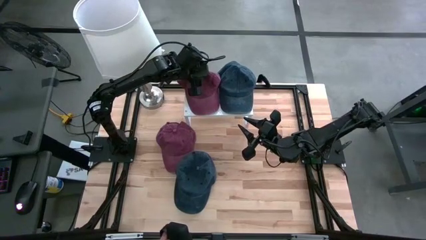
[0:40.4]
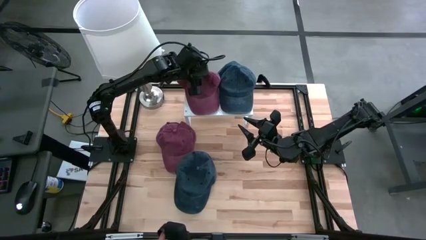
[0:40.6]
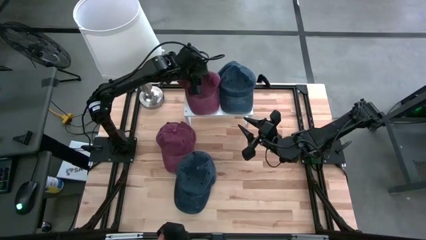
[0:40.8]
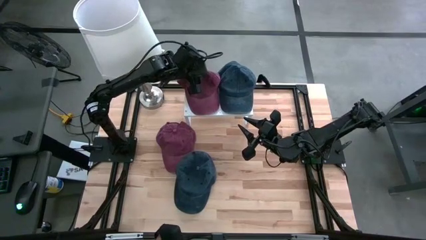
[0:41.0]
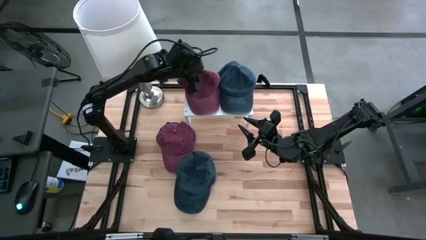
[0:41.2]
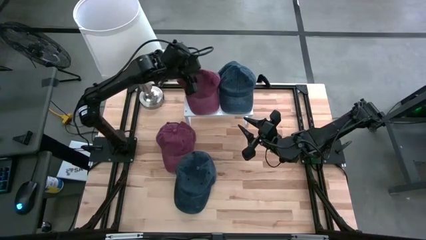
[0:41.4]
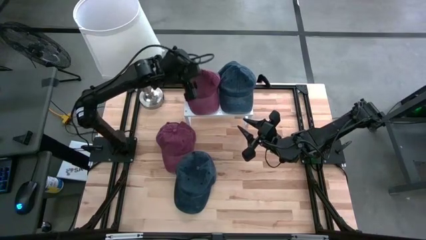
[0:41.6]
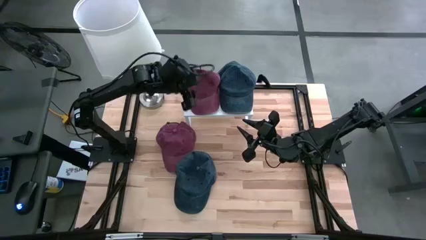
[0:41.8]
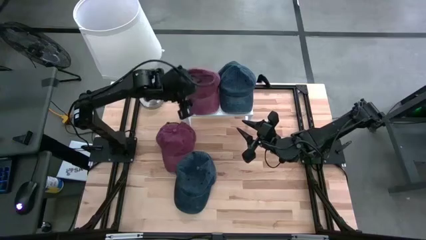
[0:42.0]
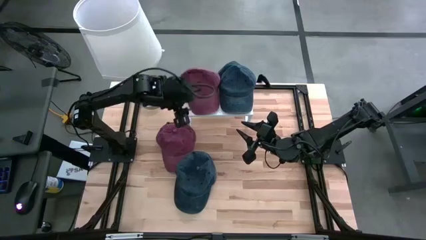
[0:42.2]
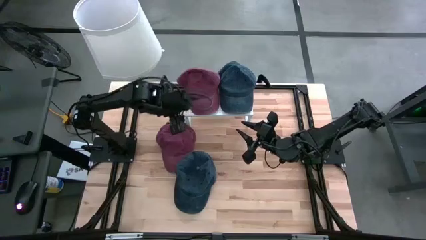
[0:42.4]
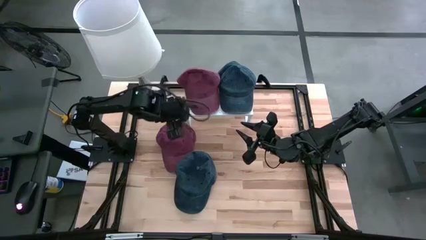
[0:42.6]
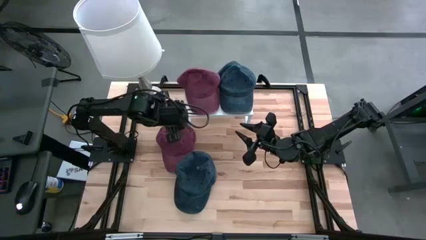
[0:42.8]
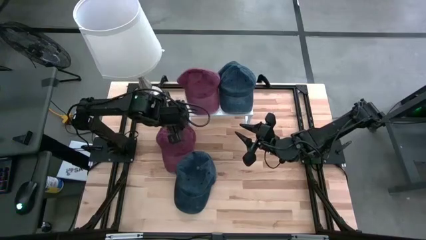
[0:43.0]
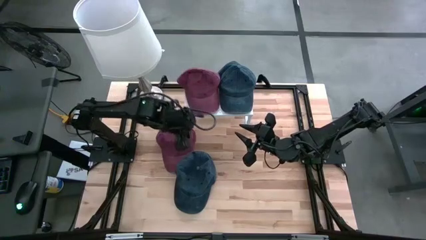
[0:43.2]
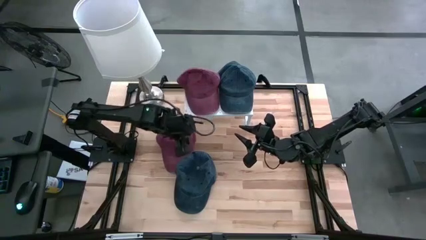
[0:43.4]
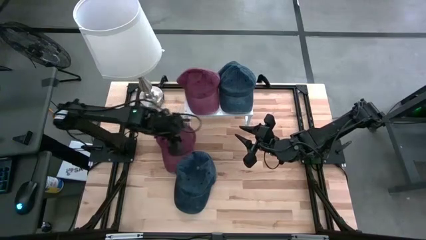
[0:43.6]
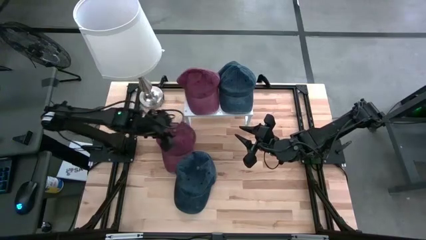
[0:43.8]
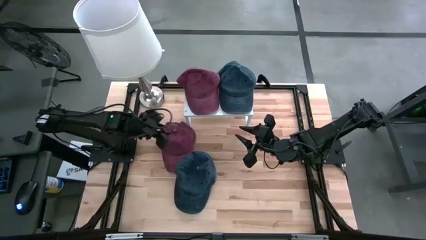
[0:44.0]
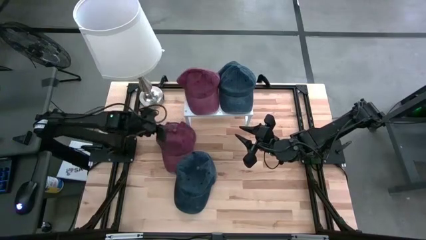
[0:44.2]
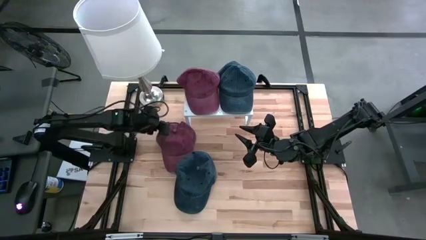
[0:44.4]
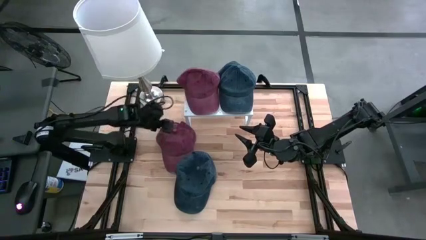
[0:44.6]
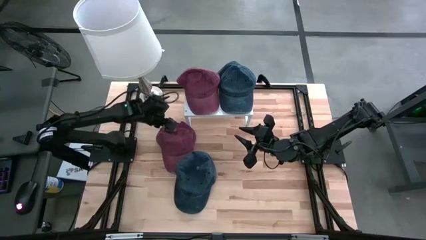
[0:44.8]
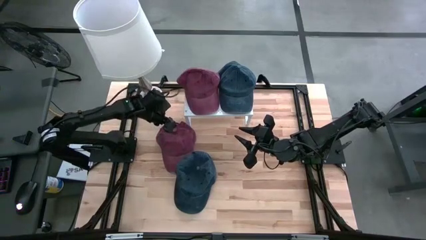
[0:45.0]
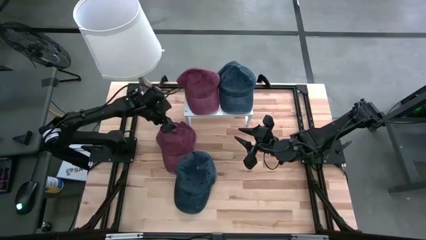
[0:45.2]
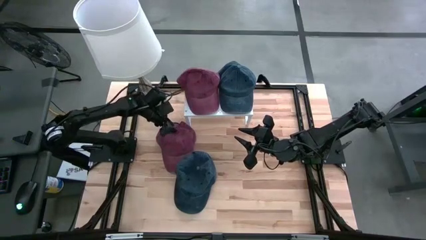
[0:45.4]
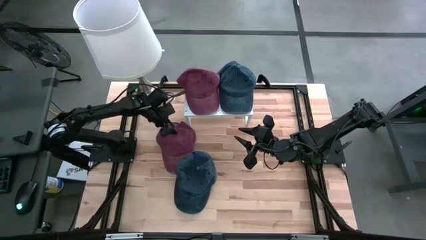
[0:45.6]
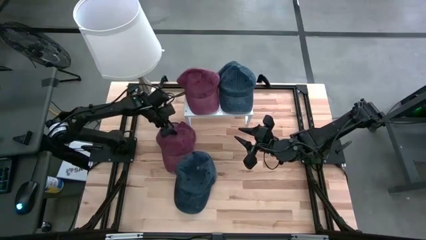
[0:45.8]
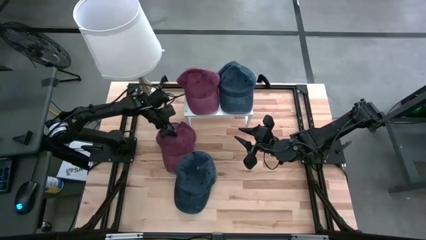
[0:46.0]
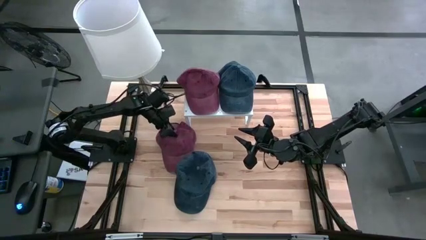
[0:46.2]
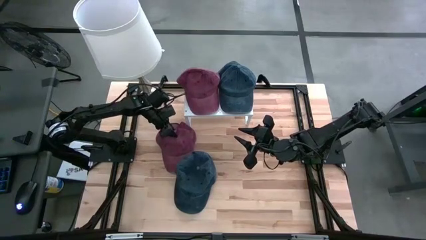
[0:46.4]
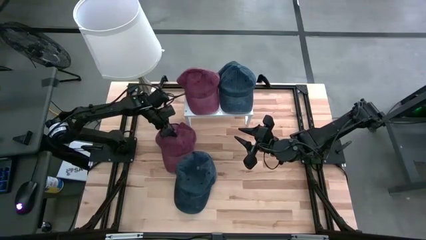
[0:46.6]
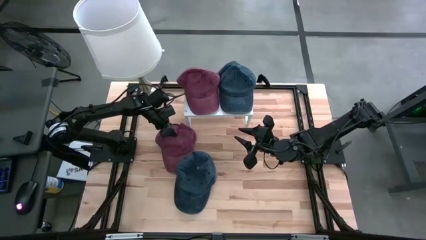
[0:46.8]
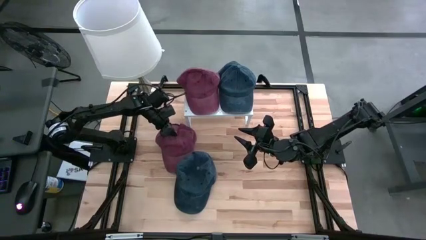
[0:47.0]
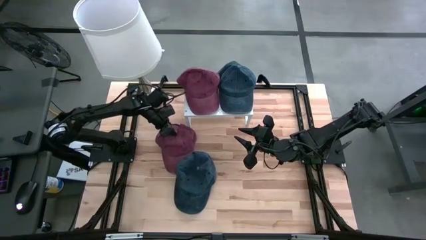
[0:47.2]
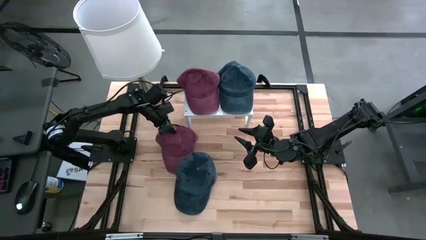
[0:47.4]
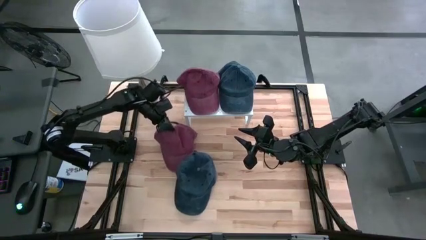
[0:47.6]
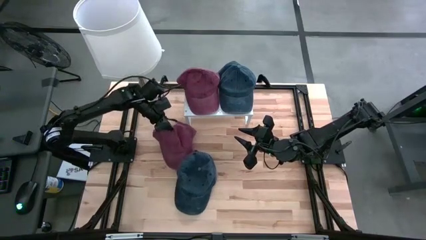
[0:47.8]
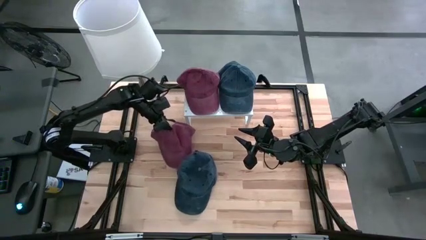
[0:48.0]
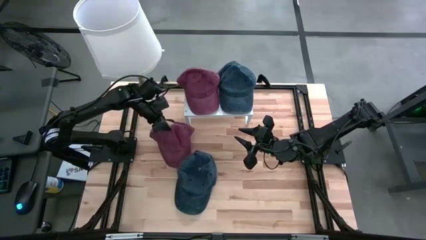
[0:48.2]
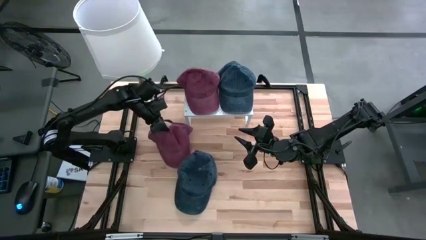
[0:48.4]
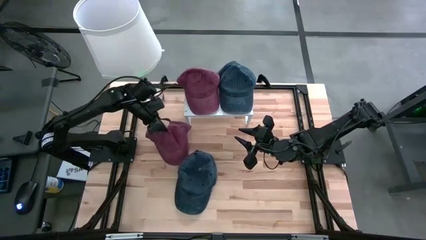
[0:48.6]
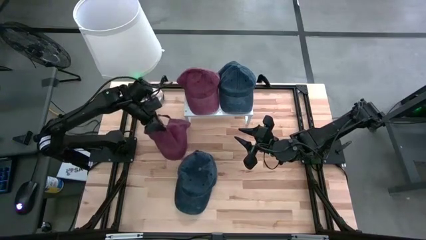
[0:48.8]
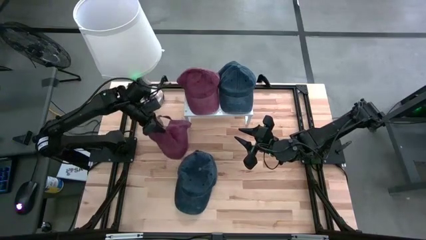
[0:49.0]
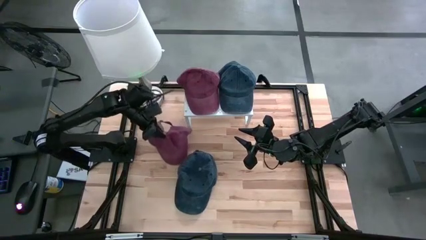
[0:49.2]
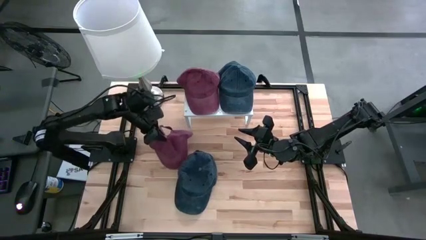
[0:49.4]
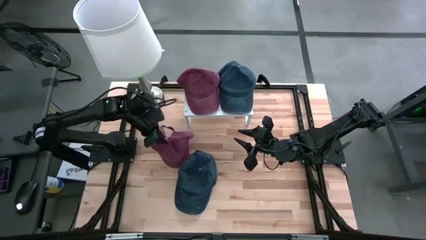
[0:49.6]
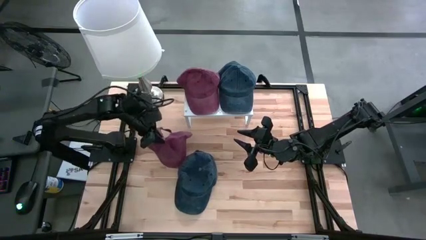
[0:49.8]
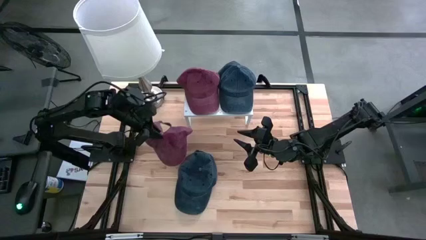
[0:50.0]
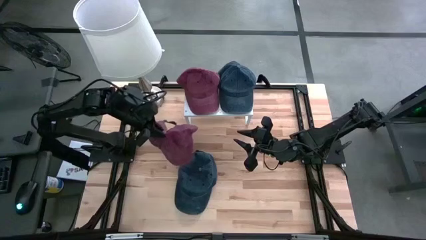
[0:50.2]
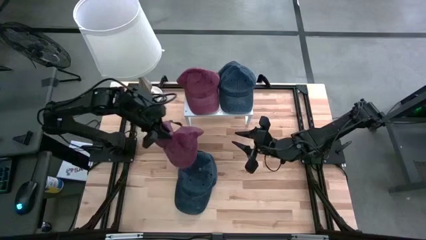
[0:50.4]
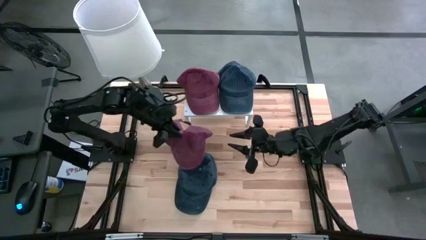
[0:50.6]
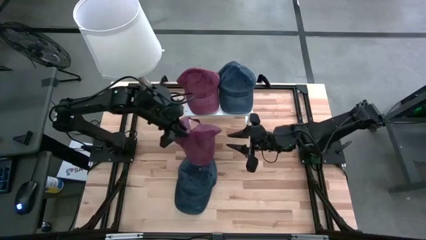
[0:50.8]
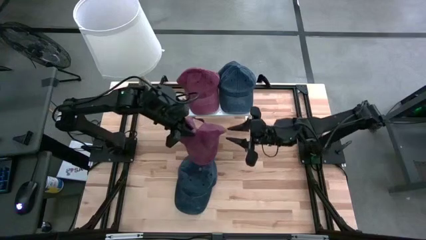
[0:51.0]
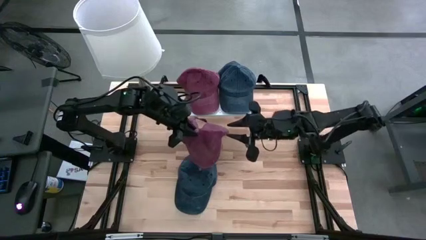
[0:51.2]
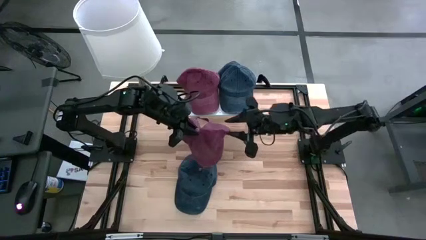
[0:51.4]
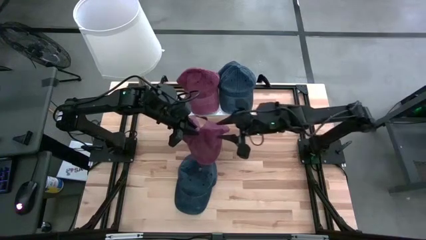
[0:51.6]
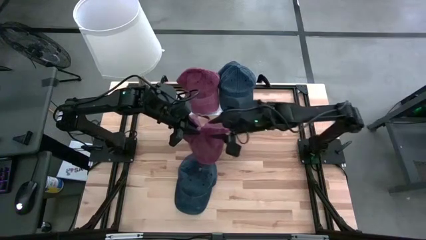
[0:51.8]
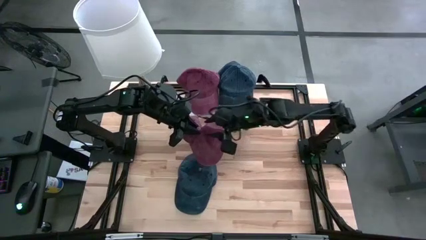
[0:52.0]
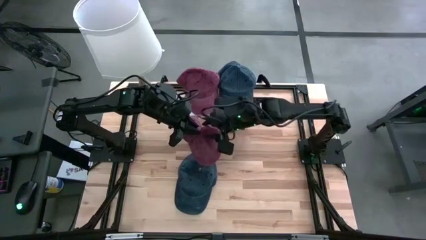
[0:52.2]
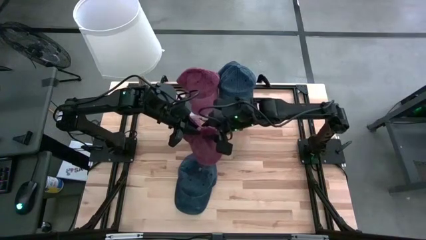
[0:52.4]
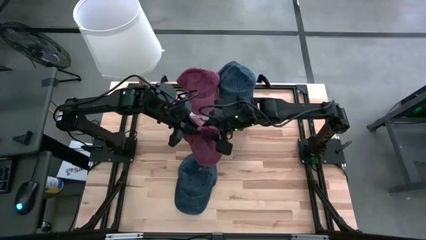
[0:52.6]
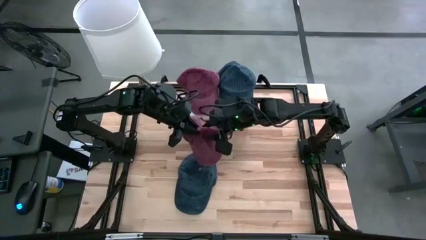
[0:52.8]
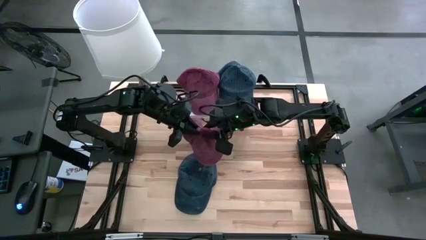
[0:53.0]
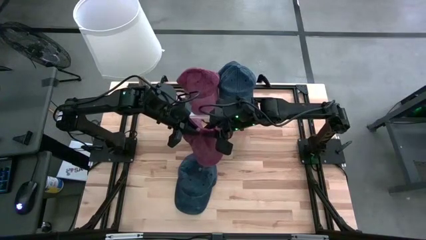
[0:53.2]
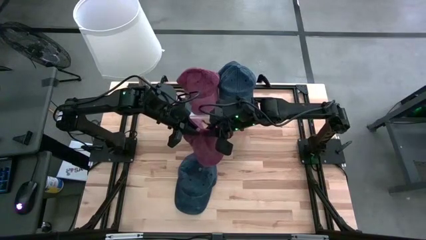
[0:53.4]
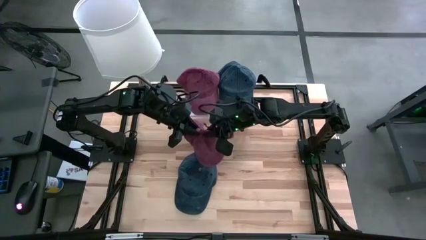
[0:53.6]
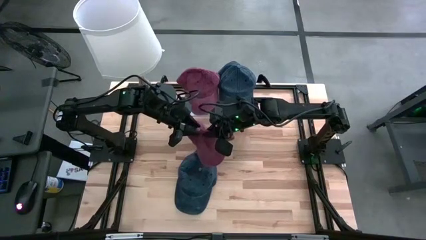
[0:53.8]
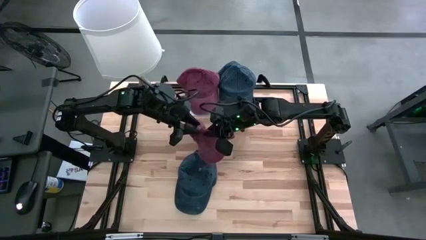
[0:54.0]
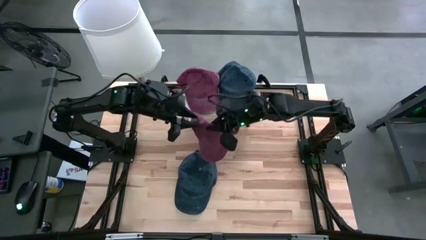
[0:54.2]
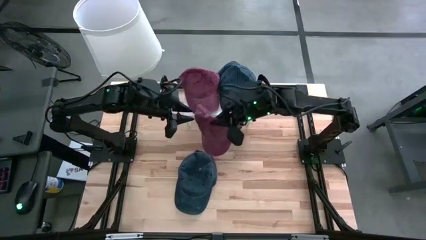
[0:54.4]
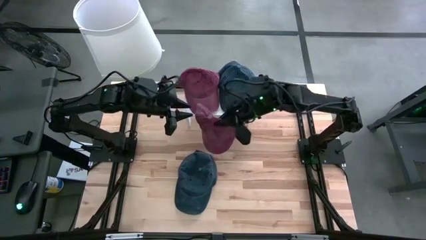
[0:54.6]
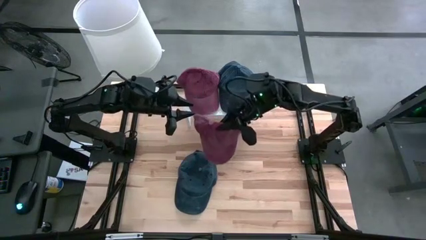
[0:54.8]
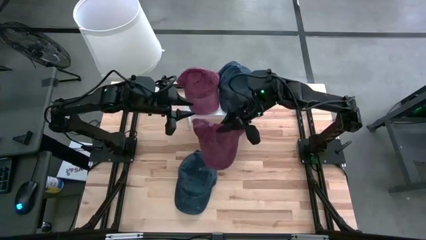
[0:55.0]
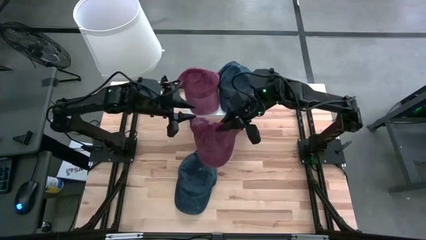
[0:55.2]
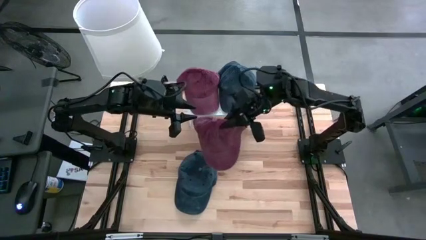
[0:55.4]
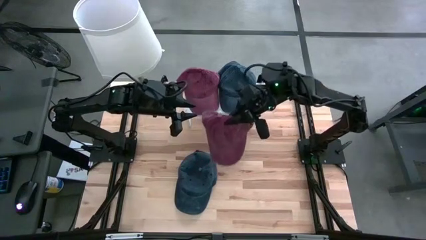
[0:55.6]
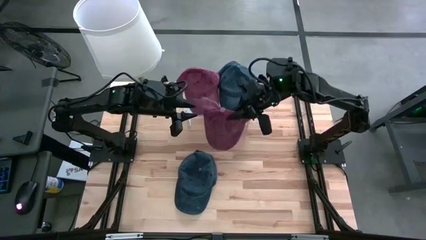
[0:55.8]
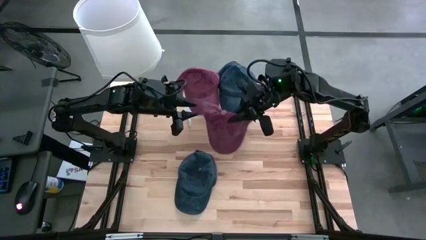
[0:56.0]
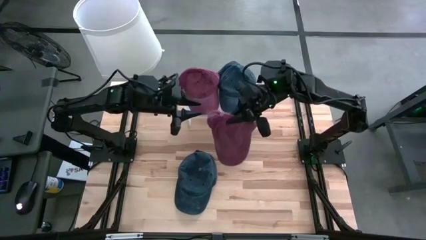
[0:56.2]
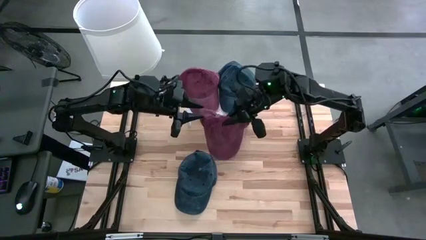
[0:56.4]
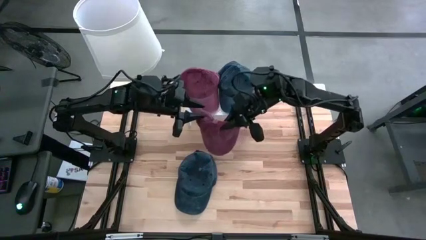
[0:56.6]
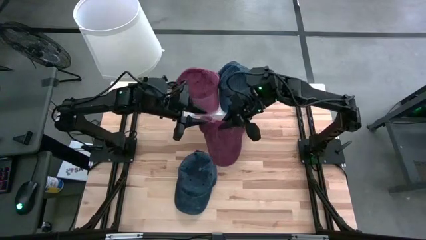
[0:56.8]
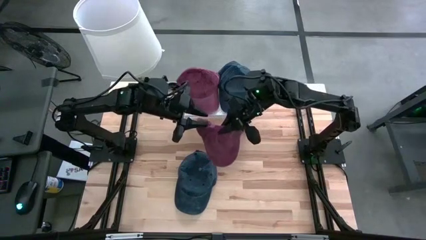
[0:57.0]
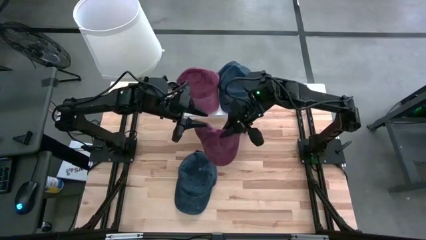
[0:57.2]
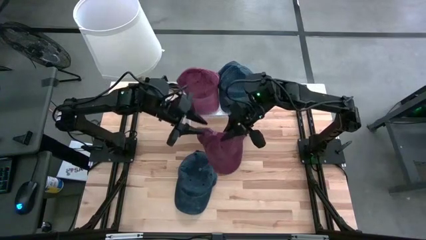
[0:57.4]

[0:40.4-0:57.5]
Task: Pick & Place hat
Stack the red cap on top of the red cap on the shelf
